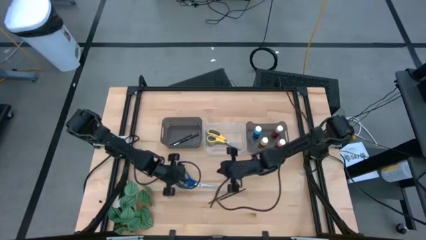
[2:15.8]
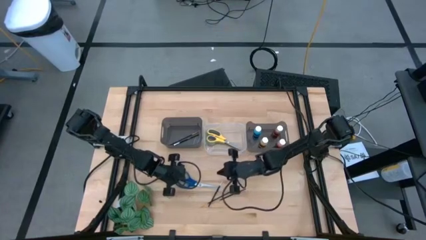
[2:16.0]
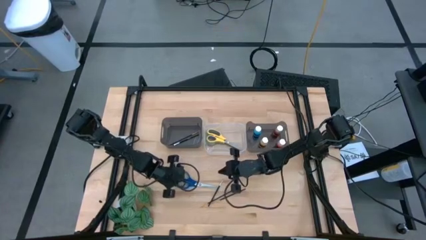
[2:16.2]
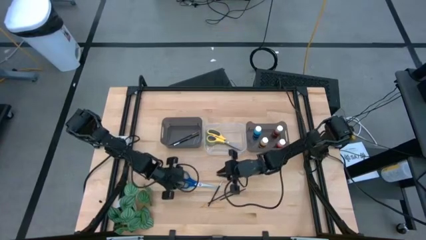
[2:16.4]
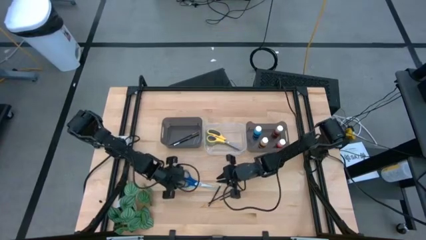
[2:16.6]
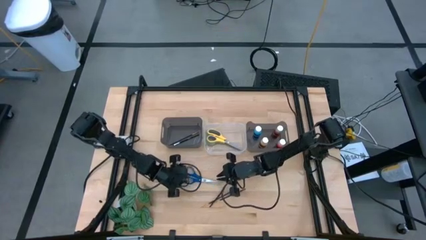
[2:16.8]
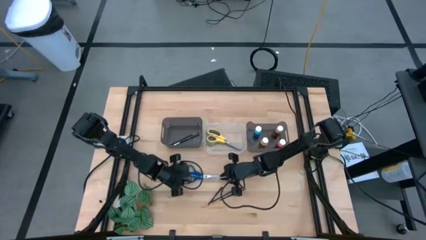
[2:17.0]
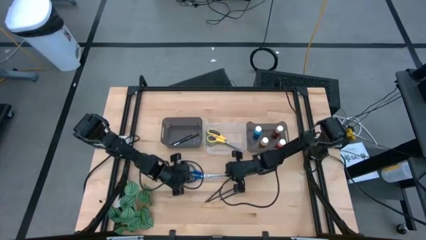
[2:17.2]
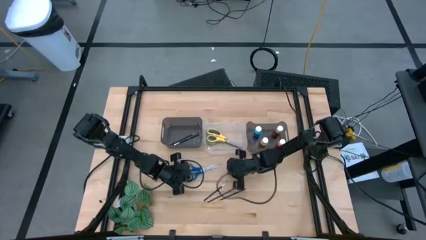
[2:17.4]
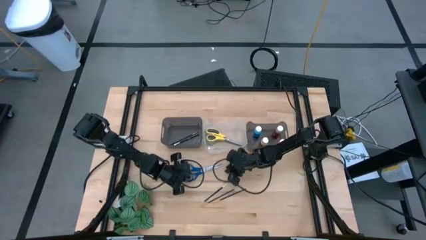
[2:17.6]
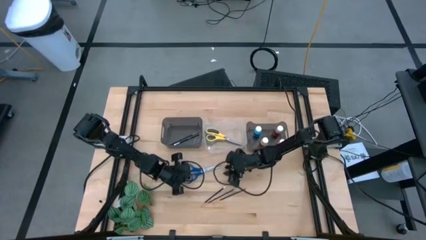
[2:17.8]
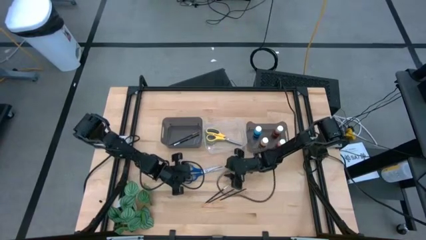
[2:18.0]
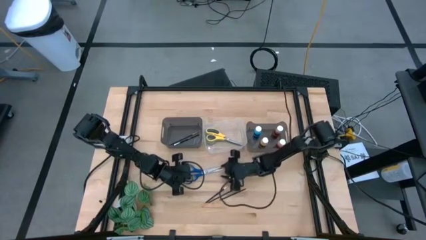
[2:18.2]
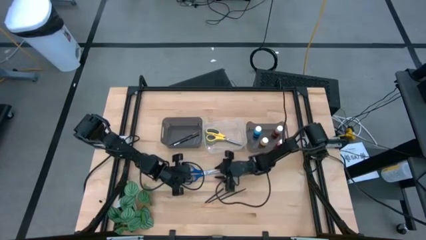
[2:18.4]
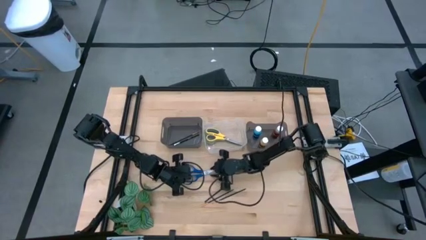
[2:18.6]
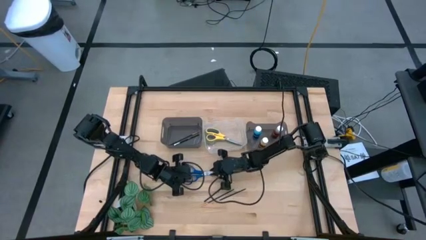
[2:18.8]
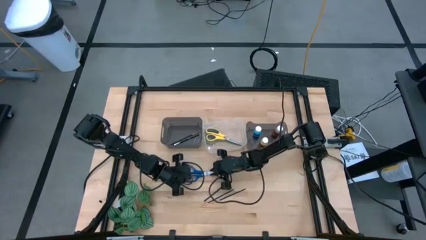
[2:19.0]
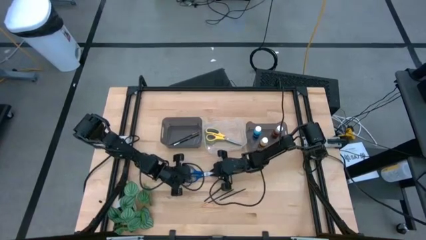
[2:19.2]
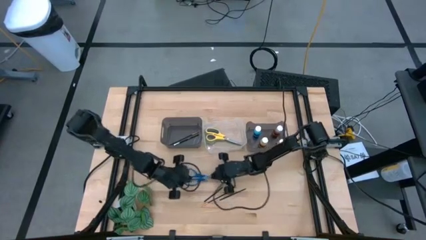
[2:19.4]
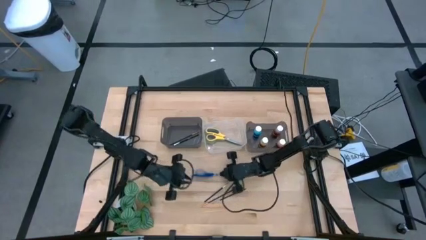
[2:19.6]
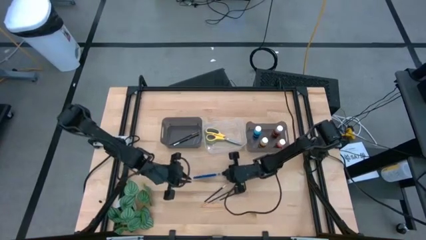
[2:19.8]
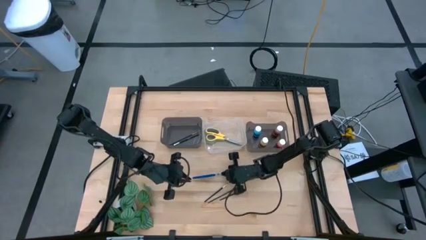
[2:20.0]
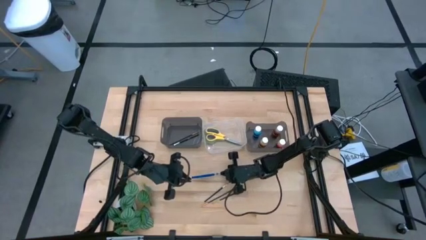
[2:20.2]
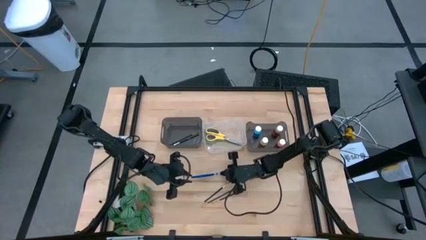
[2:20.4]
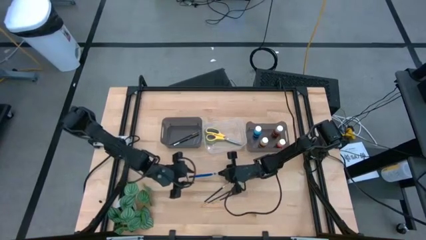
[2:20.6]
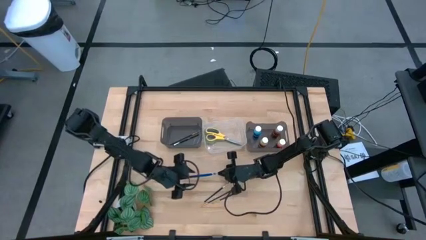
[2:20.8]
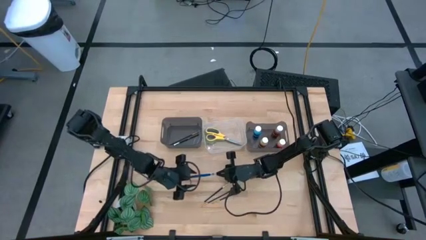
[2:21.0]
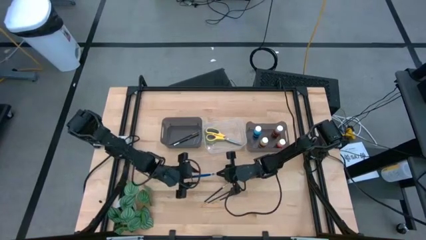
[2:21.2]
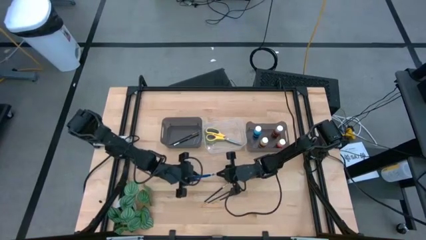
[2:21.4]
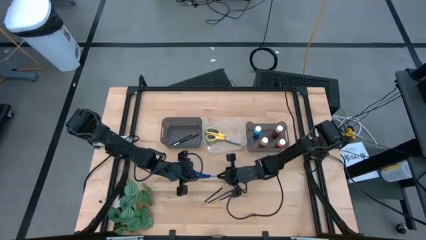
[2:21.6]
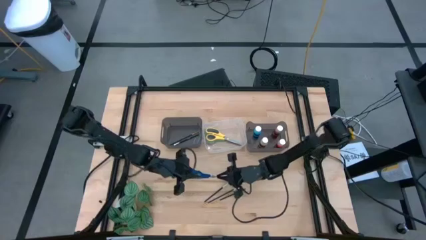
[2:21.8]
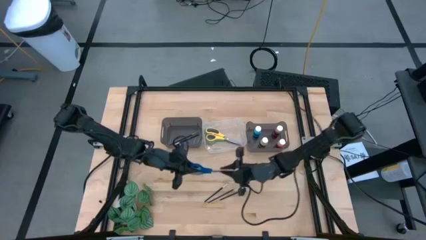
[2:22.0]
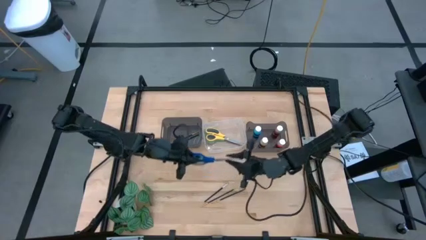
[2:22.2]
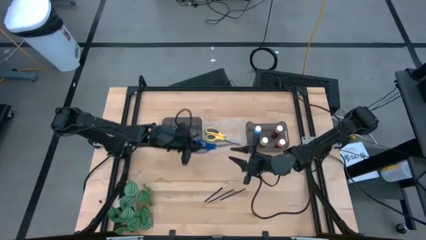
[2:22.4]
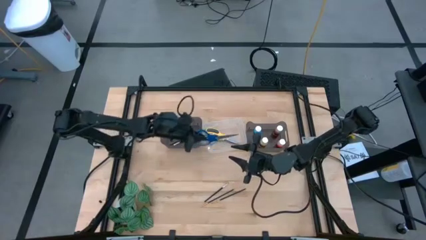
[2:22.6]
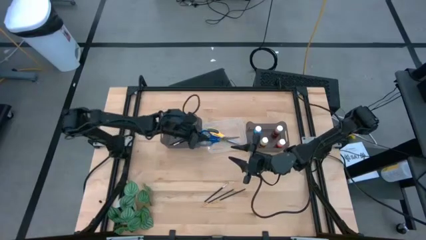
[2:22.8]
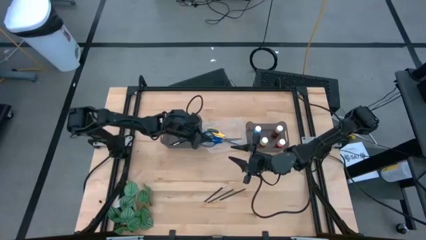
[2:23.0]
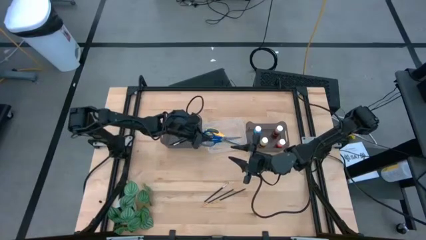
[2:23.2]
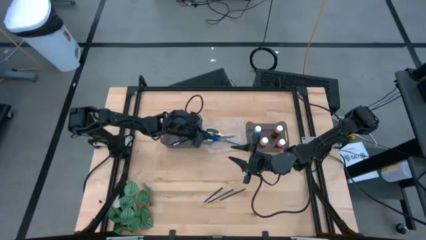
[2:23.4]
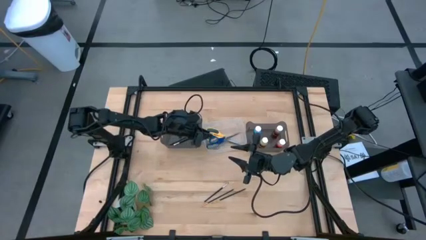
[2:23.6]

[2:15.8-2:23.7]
Task: Pick & Place Paint Supplies
Put the blue scissors into the transparent bin

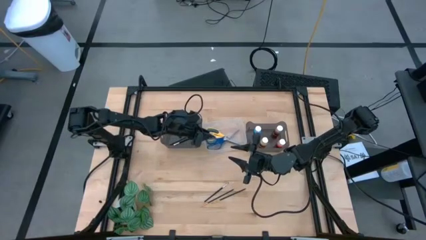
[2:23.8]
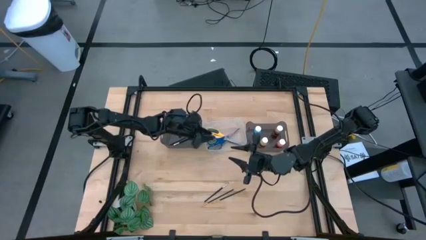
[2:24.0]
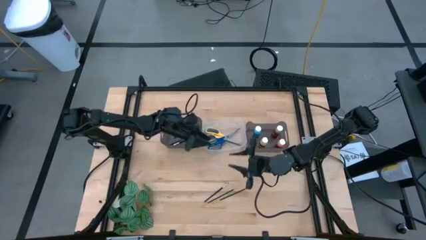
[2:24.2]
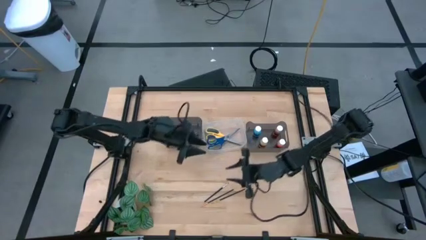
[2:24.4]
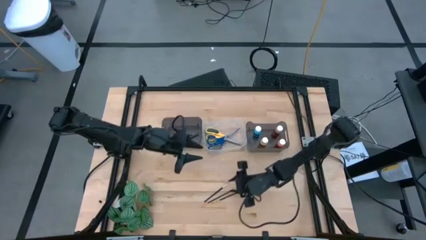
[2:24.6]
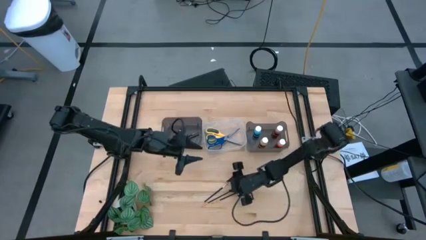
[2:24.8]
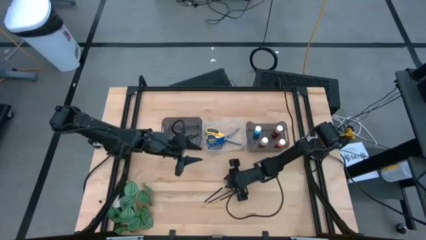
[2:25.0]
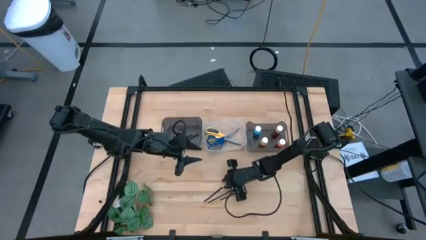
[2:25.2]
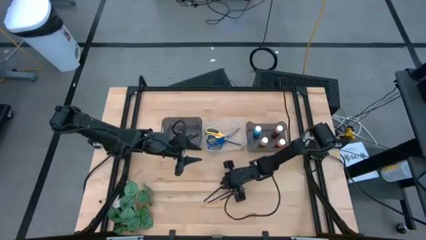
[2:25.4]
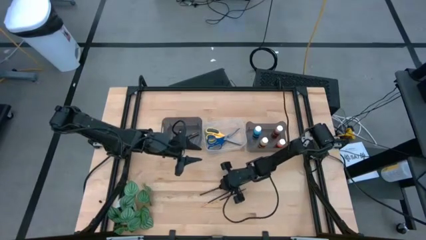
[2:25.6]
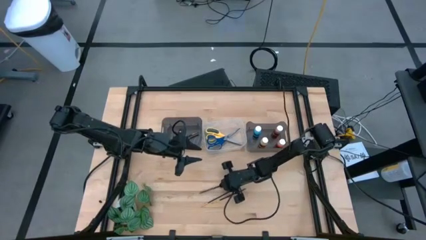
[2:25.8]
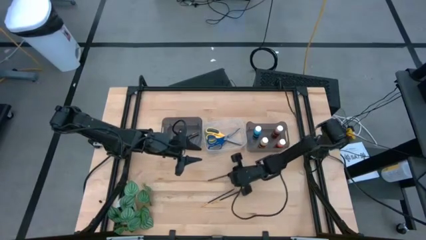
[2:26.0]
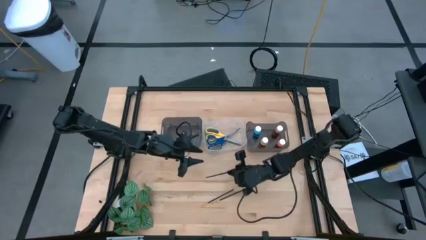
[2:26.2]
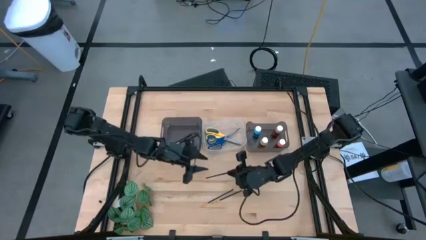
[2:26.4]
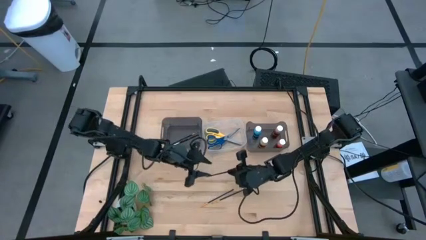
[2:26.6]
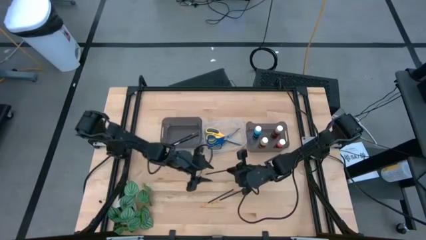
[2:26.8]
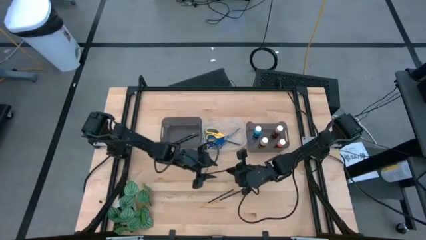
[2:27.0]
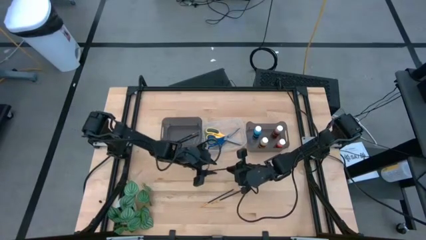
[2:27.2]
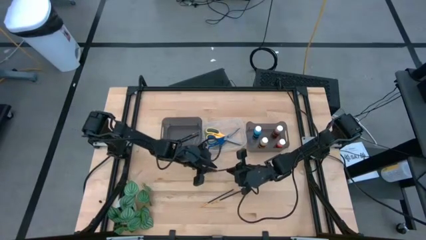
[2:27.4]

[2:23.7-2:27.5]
Put the silver paint brush into the left black bin

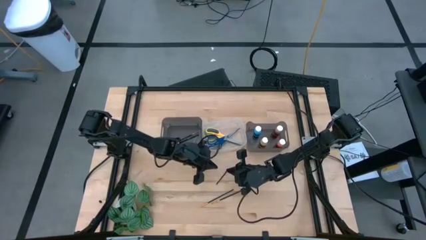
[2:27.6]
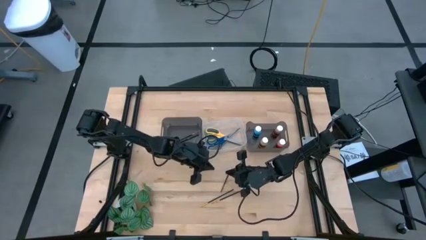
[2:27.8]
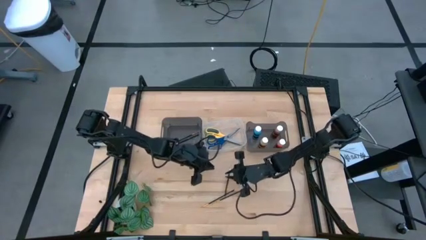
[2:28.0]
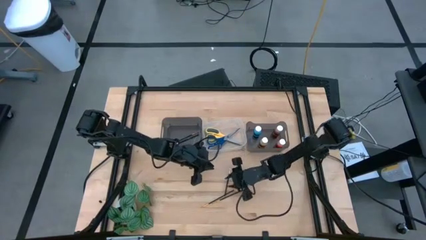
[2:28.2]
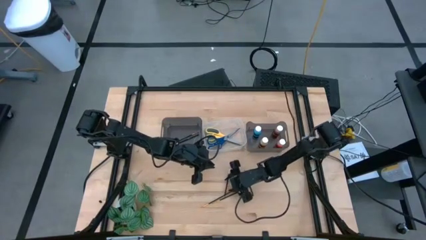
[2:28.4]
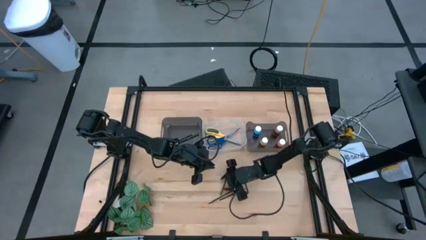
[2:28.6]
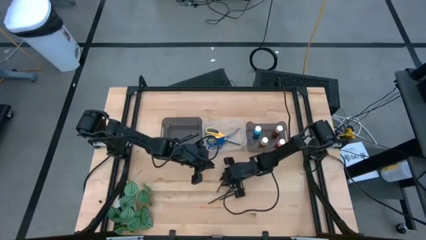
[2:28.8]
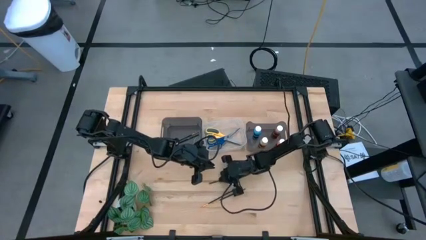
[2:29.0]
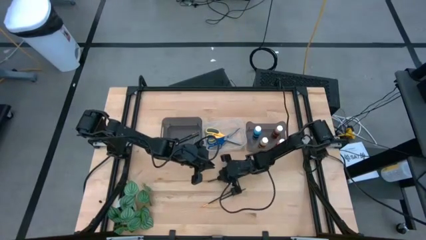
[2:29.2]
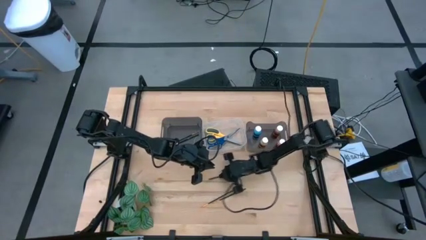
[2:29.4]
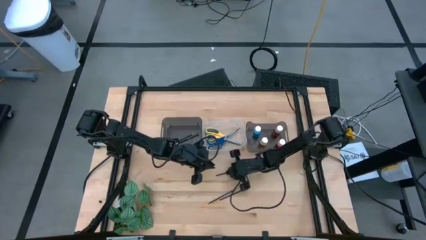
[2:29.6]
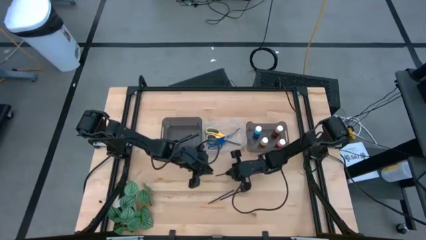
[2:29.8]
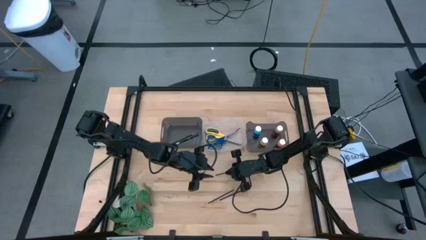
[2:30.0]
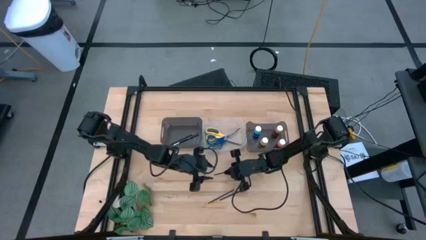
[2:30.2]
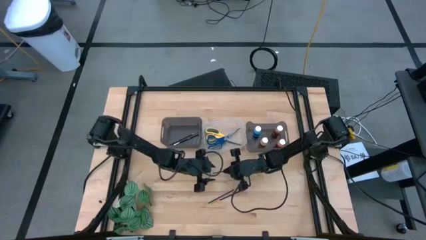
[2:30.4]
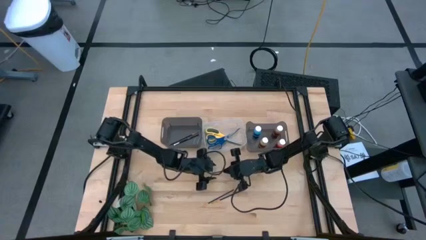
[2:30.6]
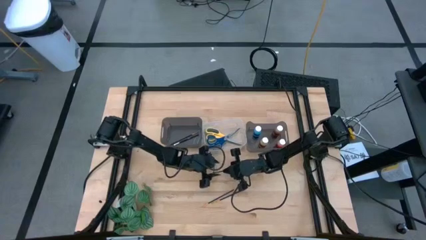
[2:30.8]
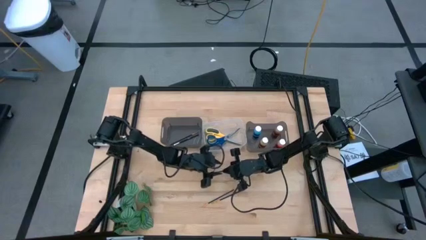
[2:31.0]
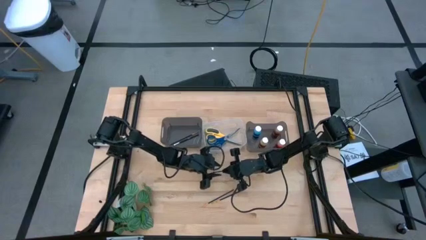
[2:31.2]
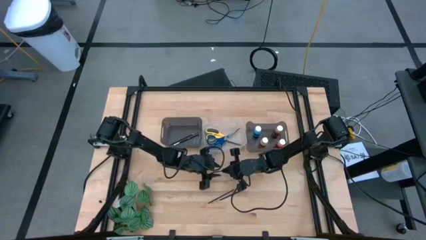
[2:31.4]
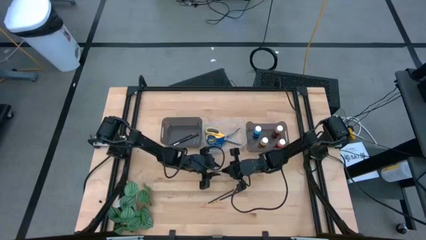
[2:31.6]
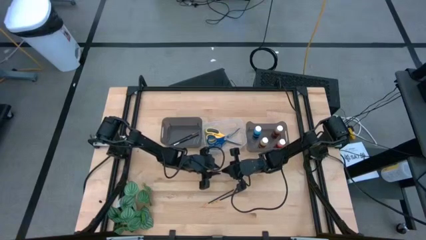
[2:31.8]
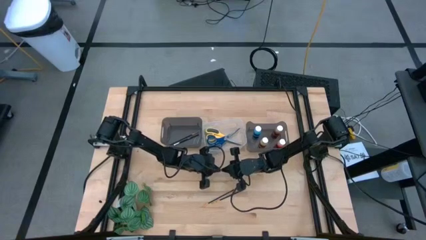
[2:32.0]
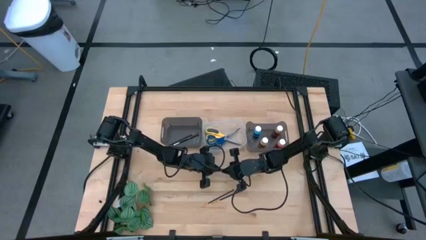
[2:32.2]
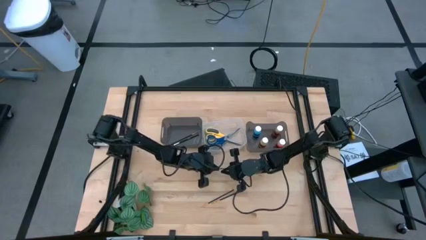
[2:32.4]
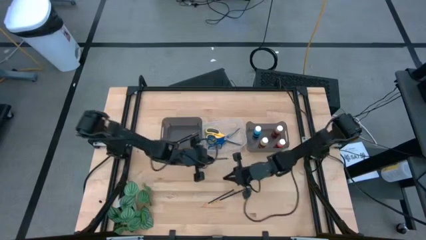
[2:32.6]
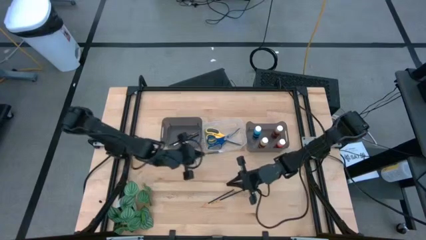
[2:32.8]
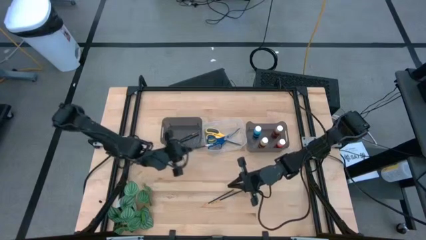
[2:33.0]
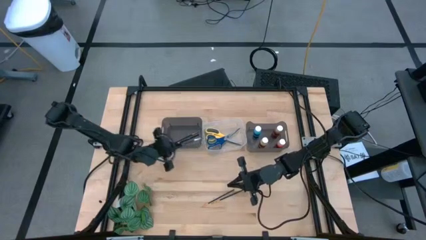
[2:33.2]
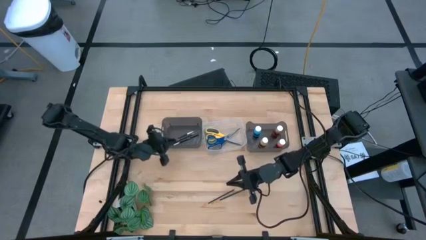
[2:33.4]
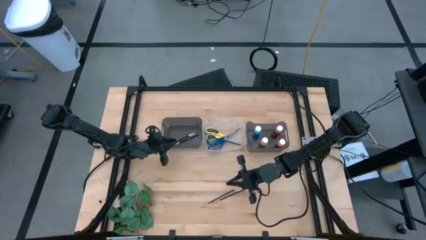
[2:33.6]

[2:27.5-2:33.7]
Put the silver paint brush into the left black bin
